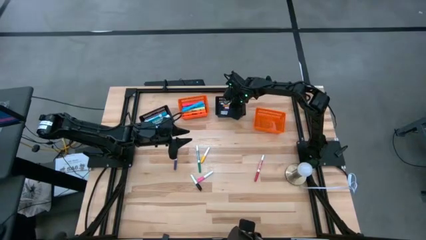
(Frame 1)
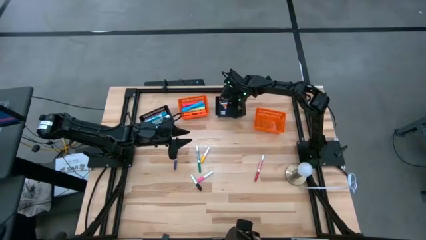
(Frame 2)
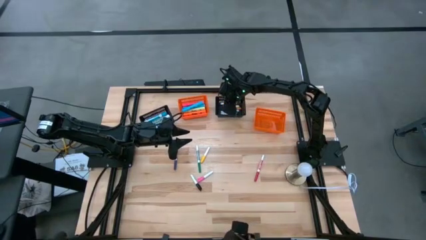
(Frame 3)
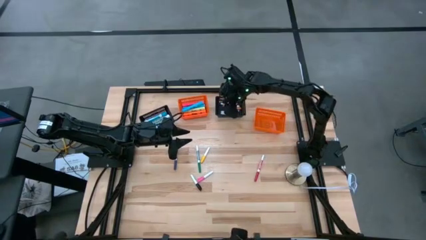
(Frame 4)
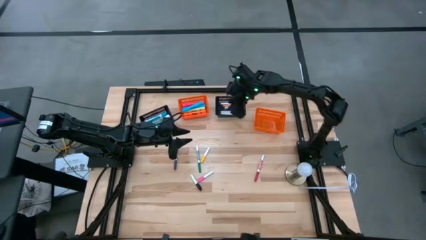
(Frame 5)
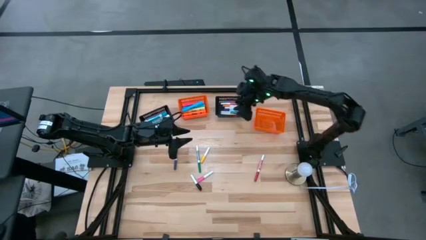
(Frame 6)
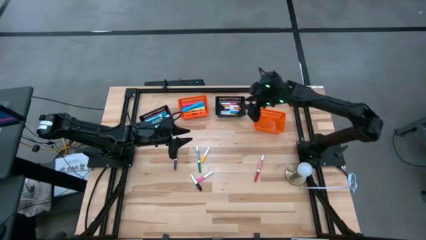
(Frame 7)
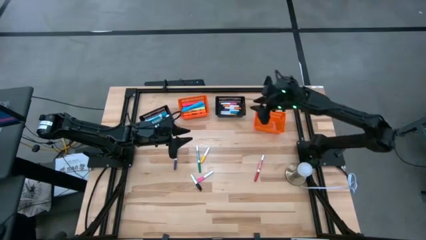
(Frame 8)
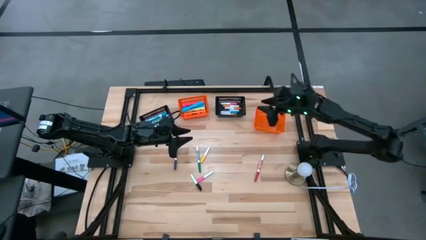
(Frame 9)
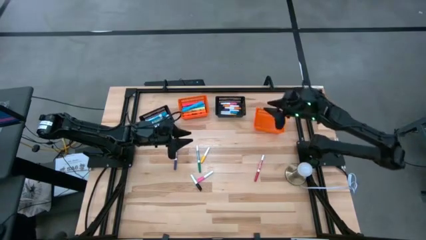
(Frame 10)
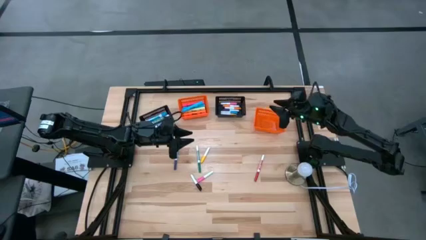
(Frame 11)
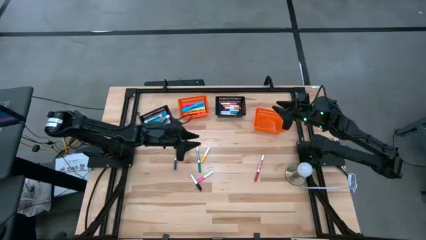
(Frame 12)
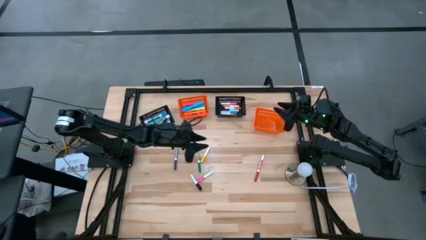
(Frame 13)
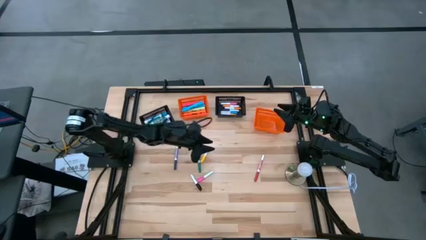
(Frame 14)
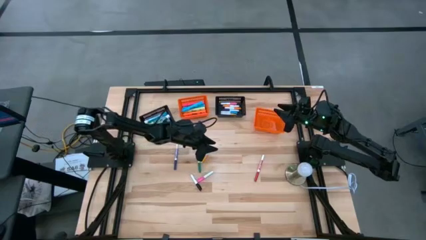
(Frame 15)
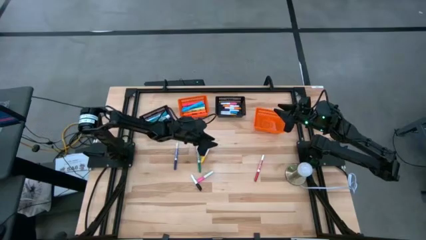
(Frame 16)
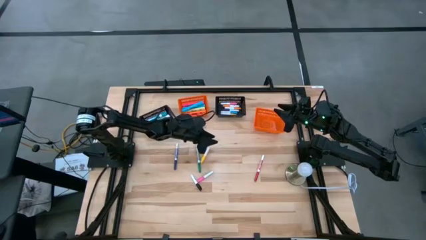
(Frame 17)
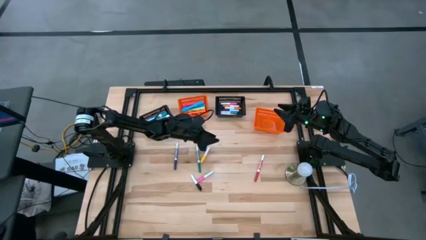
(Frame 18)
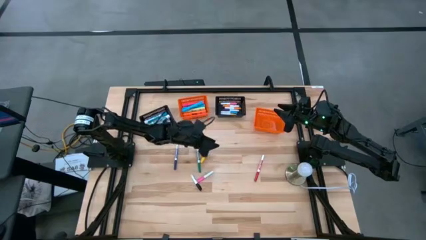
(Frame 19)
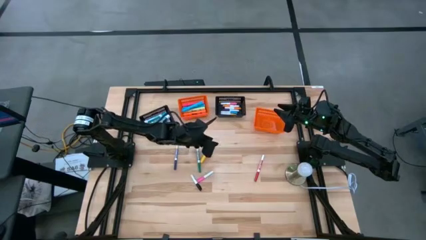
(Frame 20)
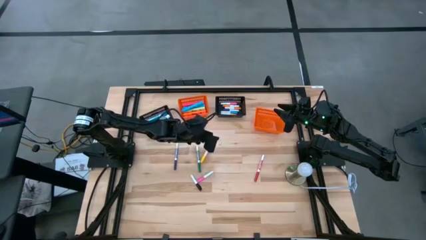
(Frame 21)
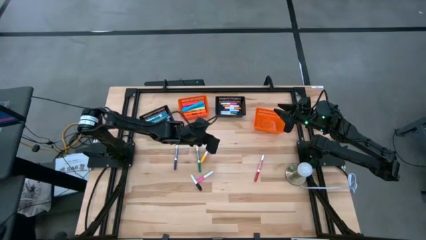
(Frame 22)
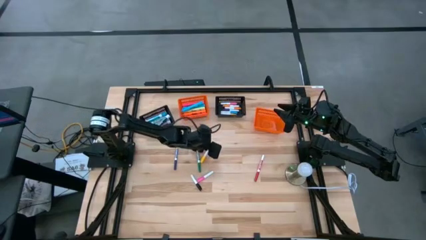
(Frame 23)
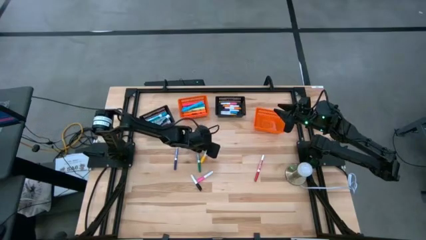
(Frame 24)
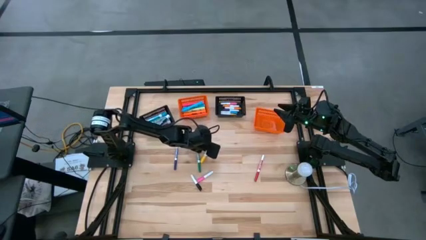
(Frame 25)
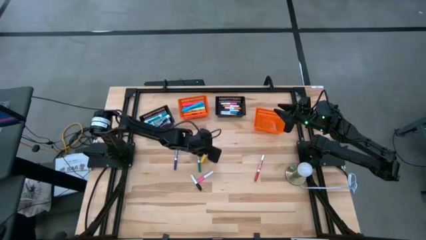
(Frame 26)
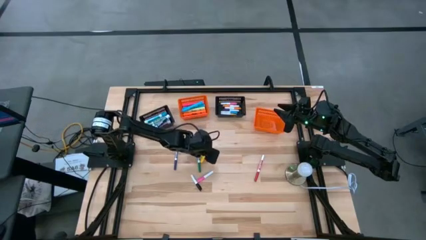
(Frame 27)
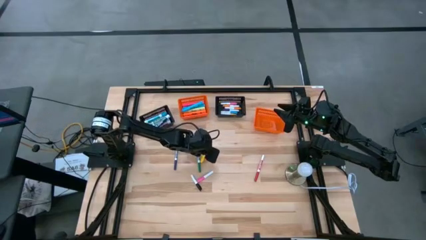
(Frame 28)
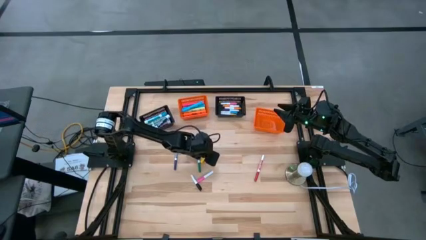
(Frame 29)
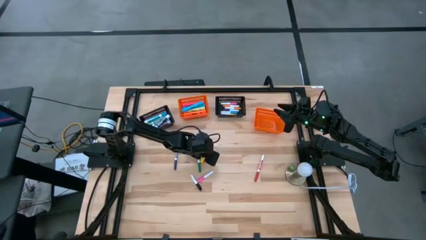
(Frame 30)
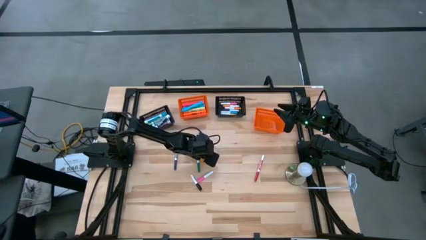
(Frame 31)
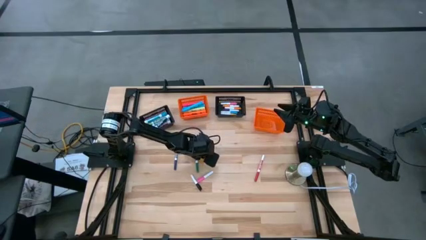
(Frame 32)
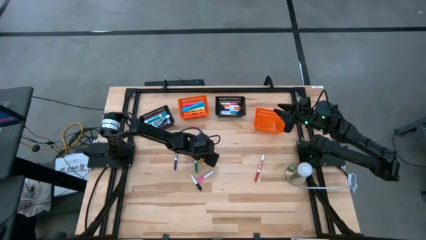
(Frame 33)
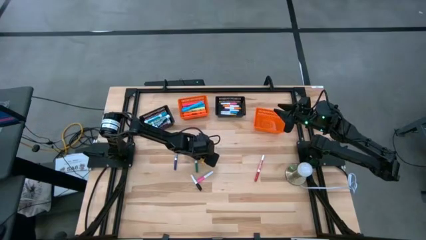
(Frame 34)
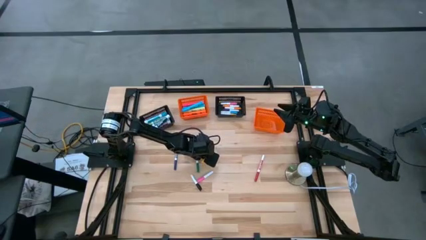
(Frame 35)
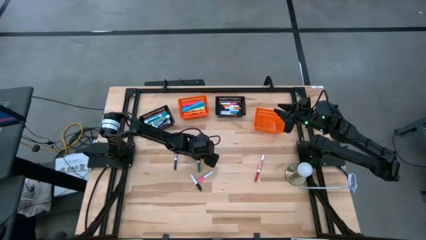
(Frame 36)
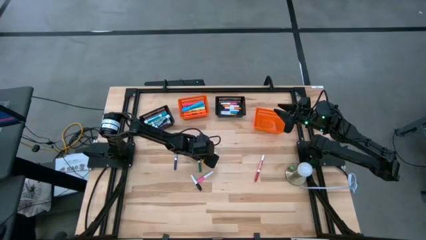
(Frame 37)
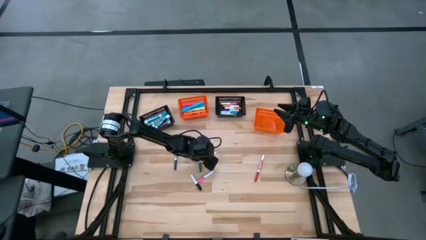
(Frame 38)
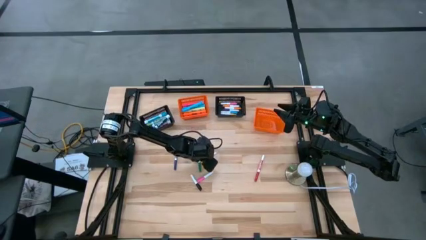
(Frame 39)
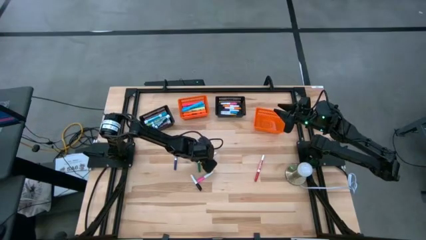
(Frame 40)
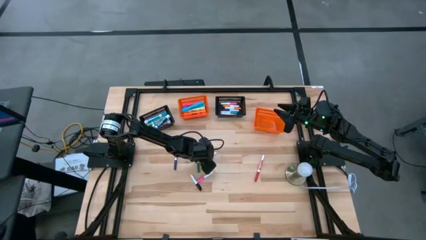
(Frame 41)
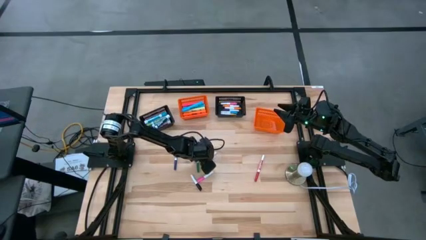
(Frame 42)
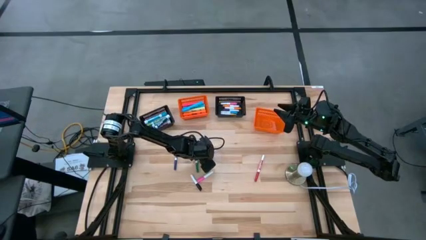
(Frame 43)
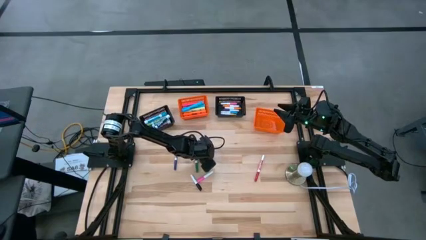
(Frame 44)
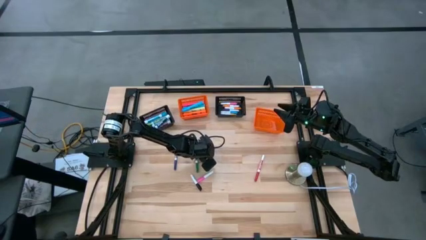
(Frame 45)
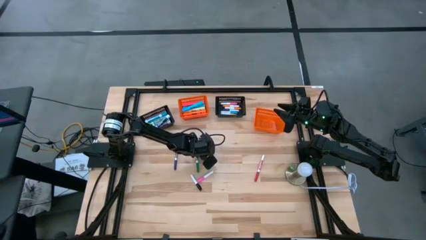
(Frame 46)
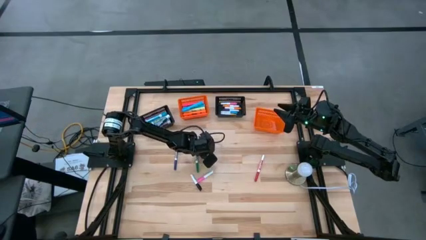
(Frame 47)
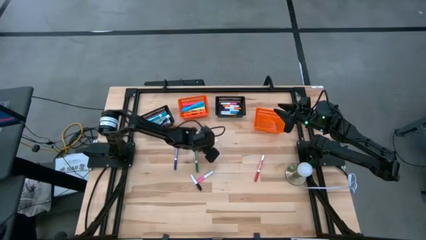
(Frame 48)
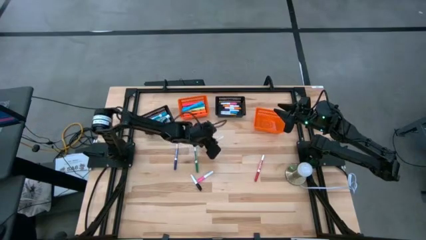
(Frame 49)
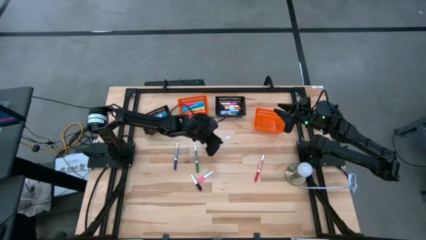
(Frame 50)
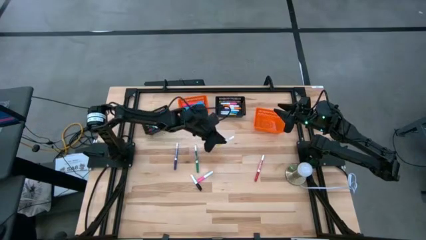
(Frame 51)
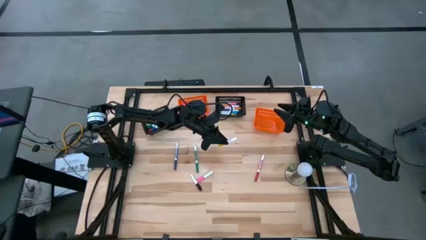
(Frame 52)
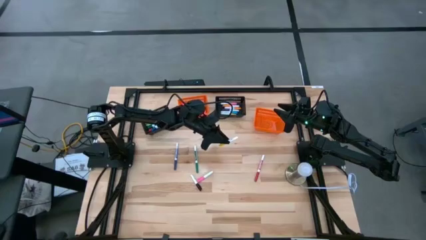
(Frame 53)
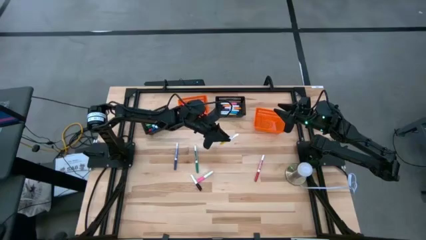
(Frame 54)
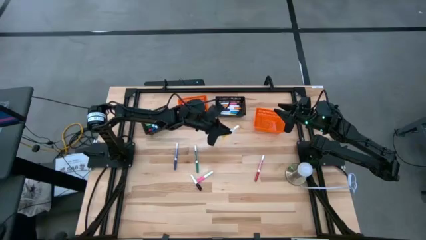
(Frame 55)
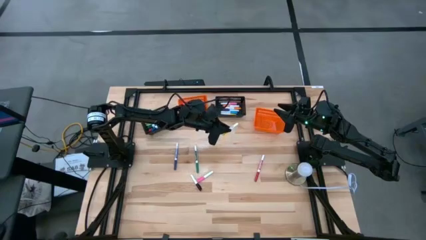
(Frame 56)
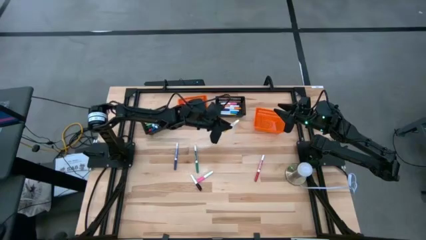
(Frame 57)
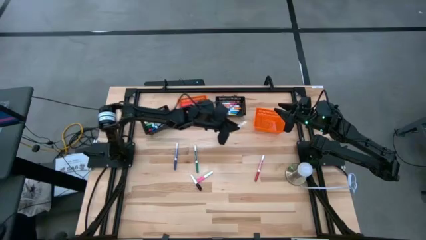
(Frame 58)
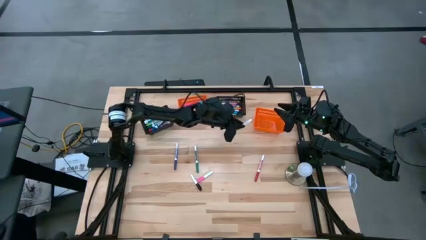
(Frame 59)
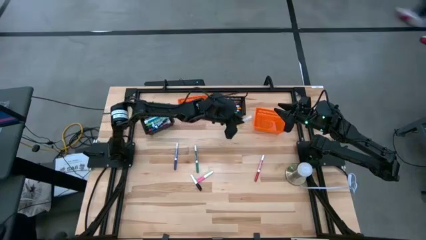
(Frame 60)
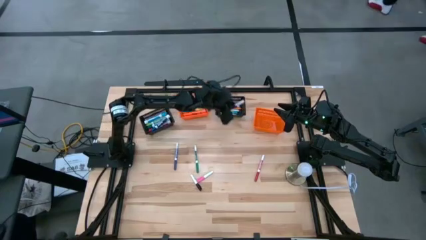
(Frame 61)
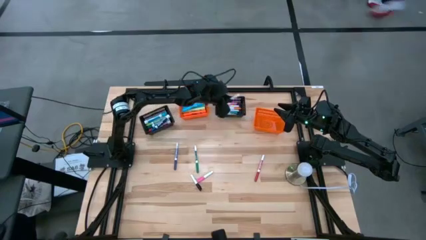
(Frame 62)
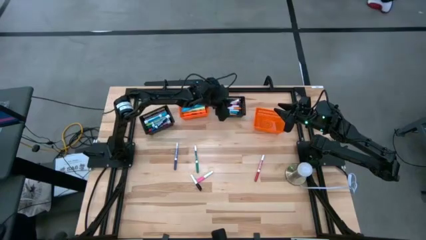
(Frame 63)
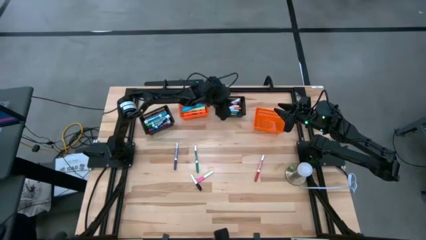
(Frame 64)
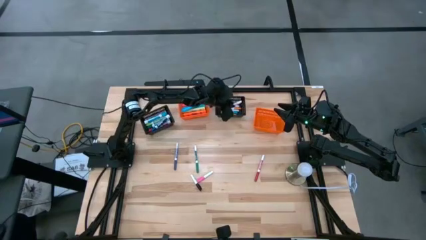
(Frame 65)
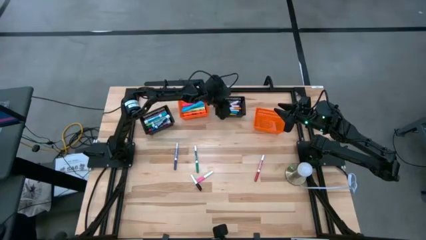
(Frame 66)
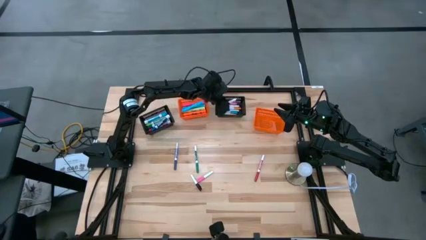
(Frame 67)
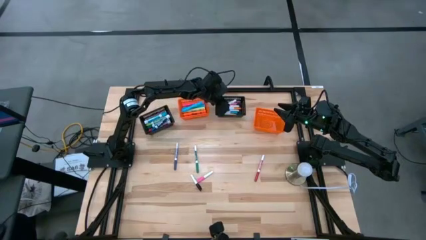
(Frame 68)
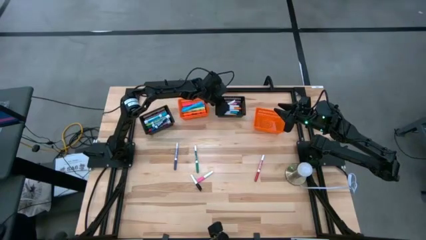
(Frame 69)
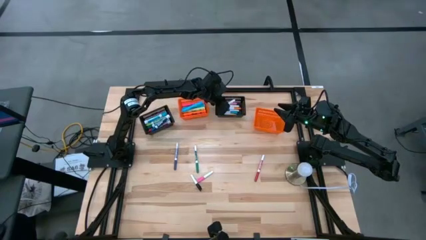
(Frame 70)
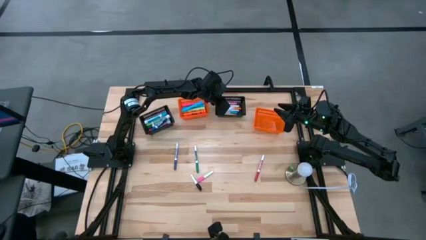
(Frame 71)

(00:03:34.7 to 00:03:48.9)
Task: Pick & Place Markers
Put the small yellow highlighter pen into the right black bin
